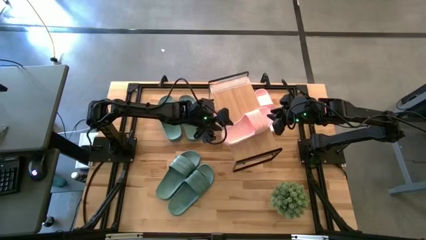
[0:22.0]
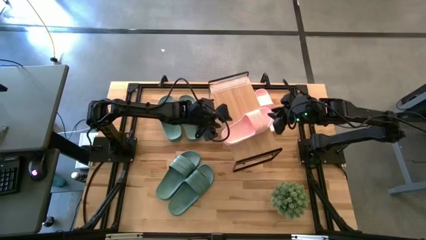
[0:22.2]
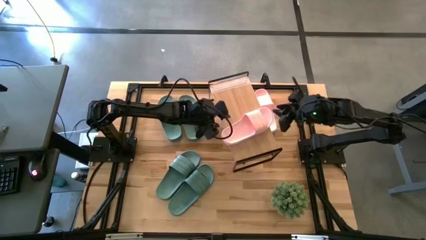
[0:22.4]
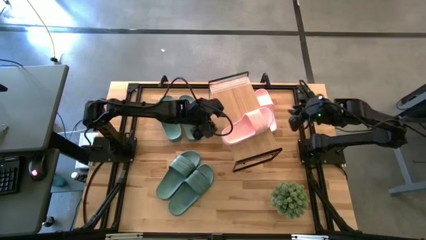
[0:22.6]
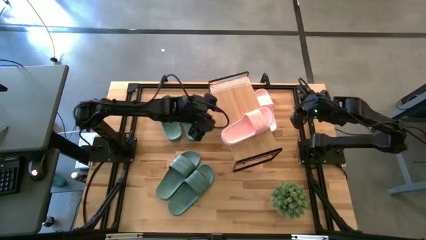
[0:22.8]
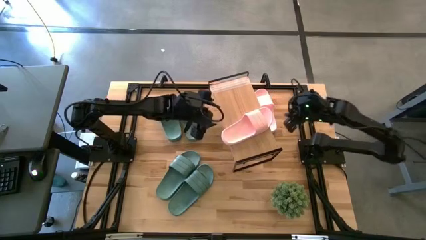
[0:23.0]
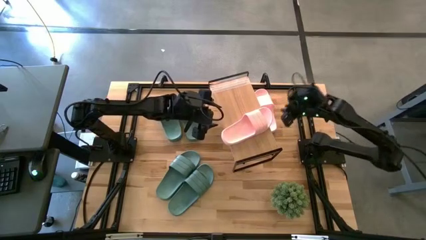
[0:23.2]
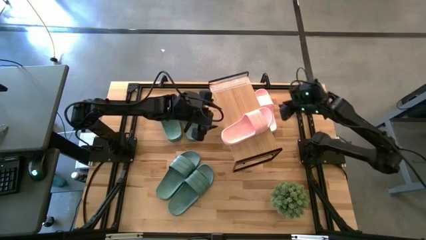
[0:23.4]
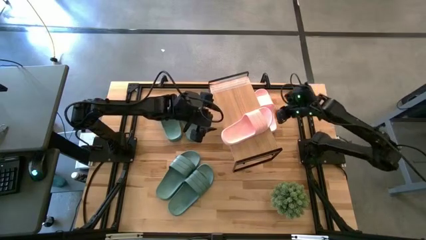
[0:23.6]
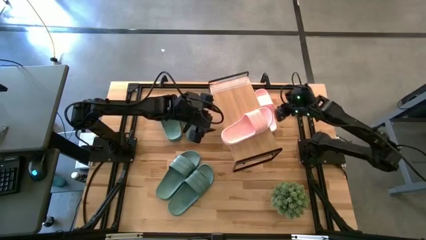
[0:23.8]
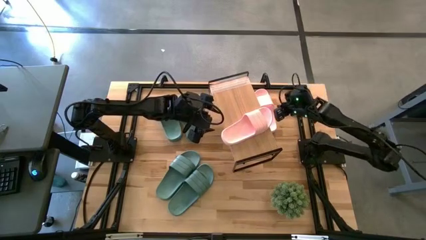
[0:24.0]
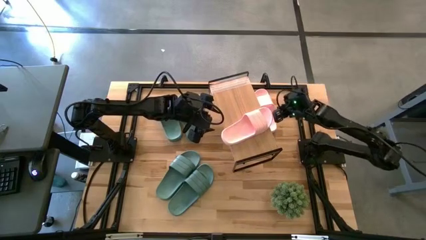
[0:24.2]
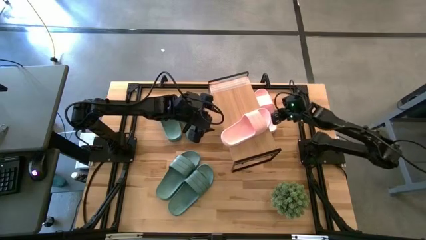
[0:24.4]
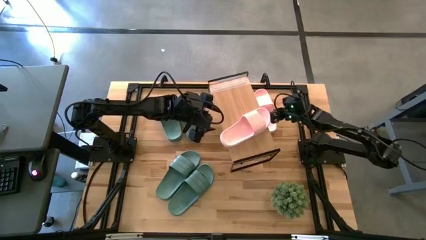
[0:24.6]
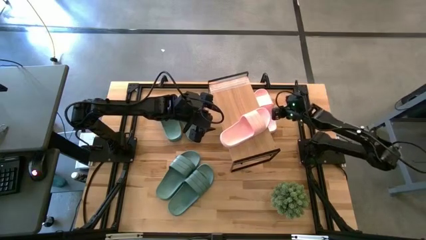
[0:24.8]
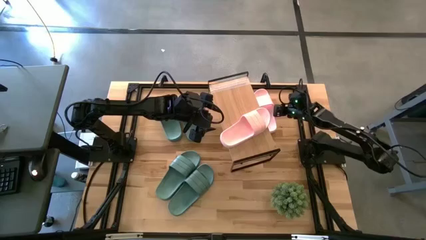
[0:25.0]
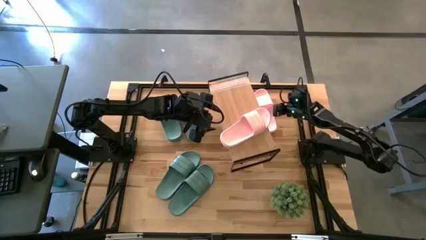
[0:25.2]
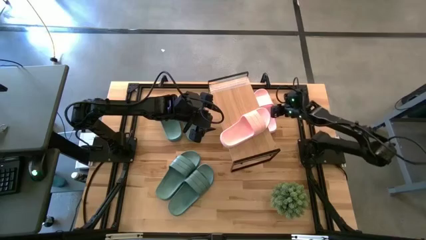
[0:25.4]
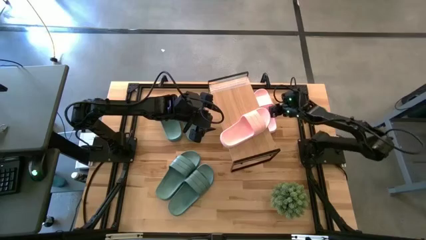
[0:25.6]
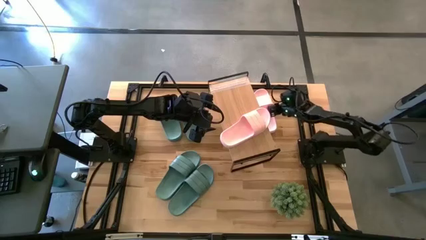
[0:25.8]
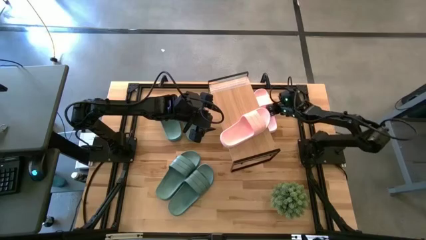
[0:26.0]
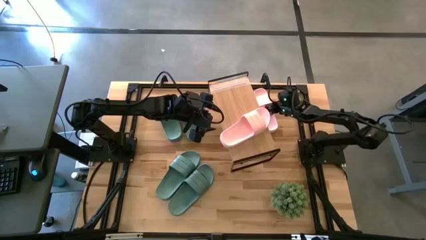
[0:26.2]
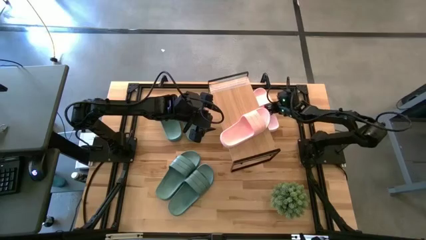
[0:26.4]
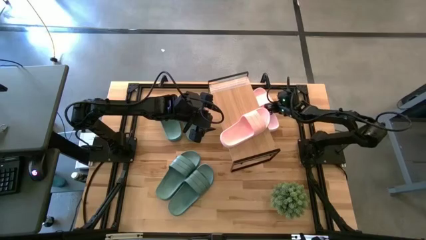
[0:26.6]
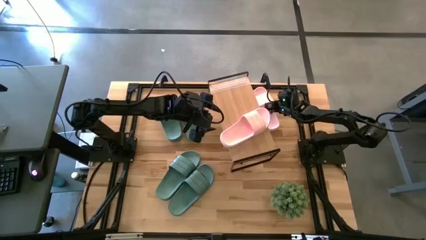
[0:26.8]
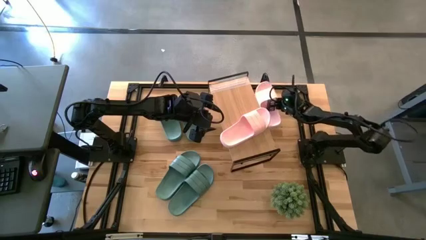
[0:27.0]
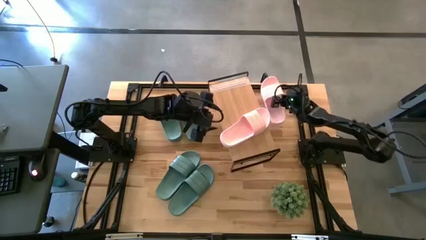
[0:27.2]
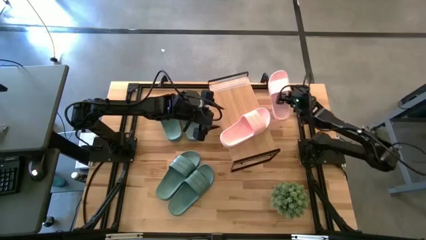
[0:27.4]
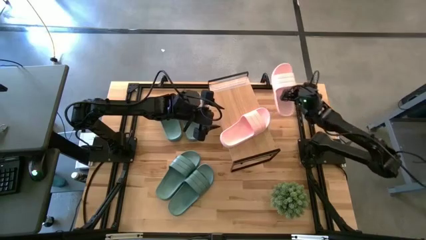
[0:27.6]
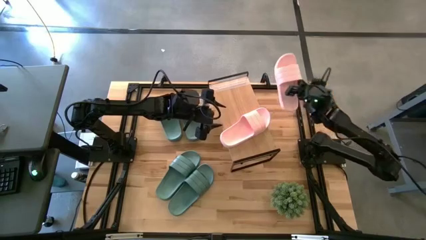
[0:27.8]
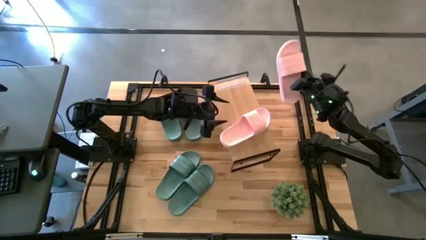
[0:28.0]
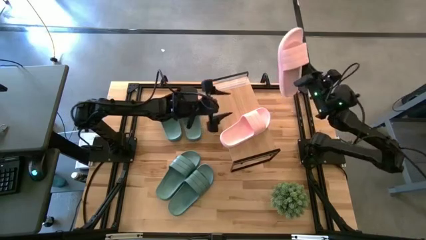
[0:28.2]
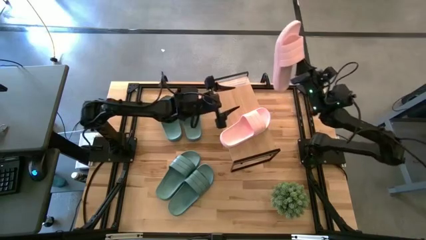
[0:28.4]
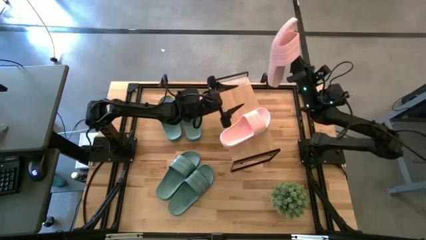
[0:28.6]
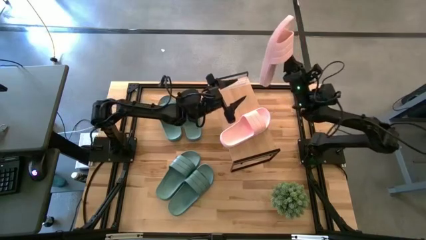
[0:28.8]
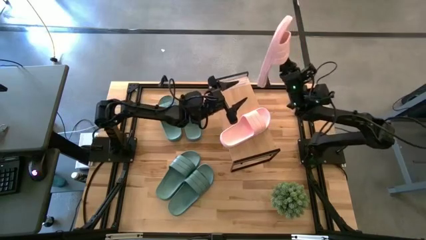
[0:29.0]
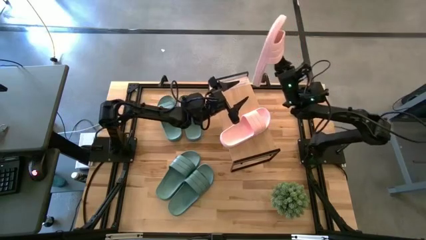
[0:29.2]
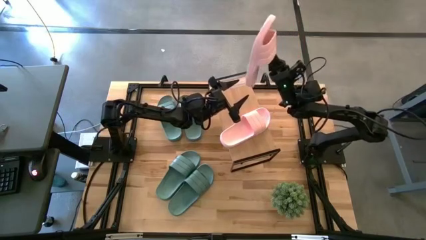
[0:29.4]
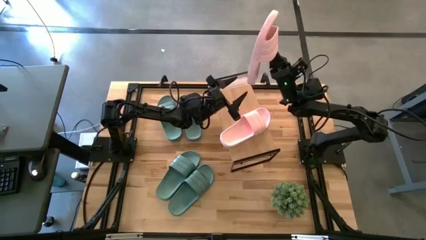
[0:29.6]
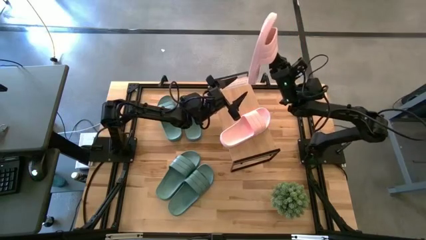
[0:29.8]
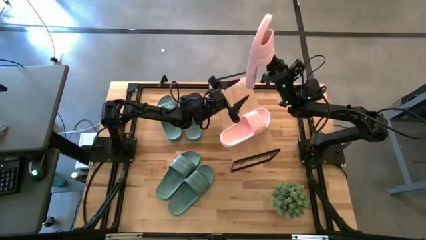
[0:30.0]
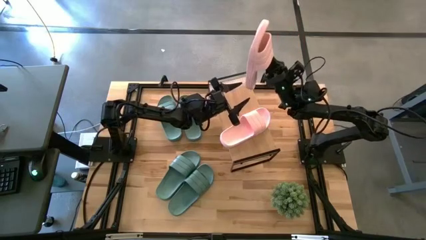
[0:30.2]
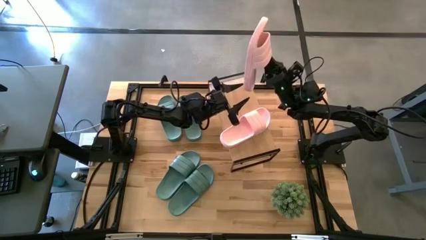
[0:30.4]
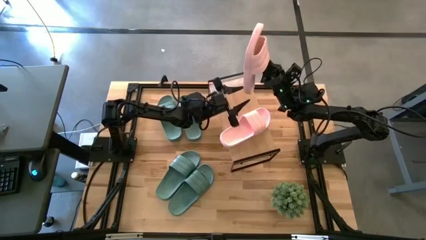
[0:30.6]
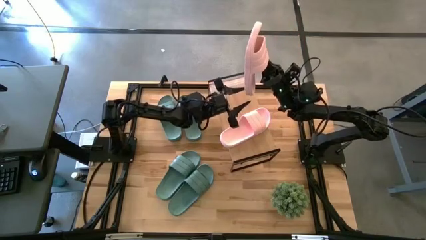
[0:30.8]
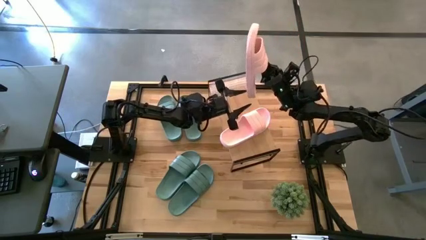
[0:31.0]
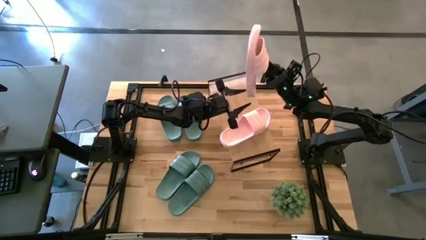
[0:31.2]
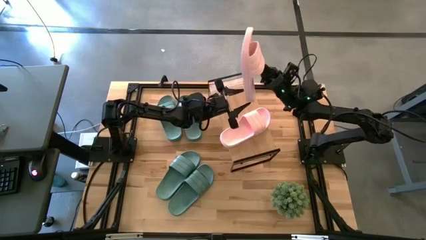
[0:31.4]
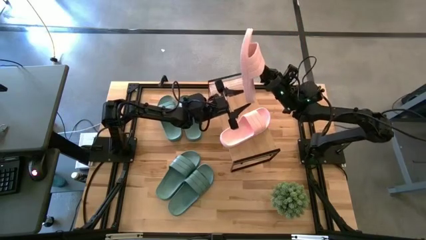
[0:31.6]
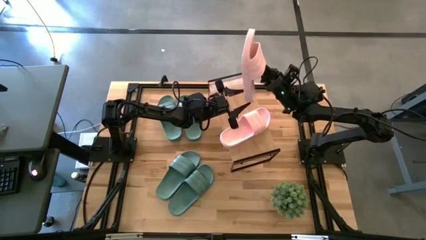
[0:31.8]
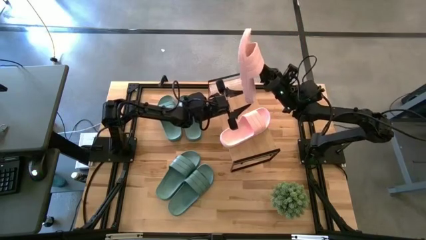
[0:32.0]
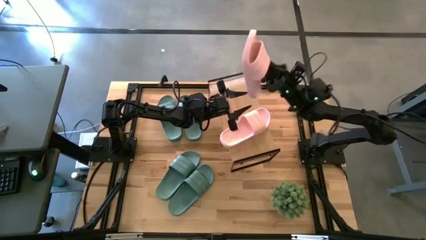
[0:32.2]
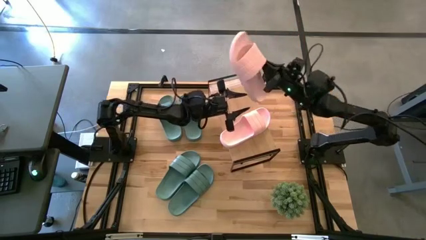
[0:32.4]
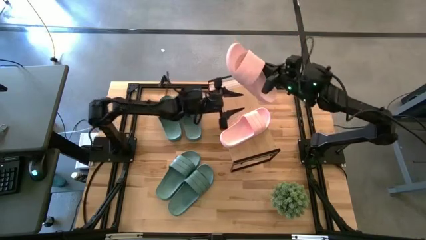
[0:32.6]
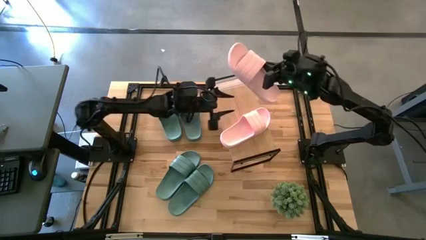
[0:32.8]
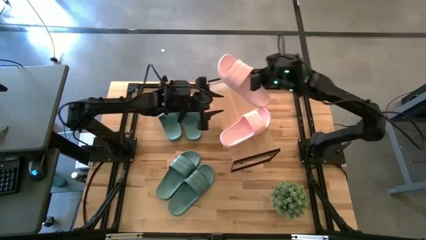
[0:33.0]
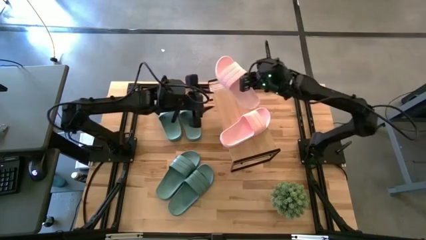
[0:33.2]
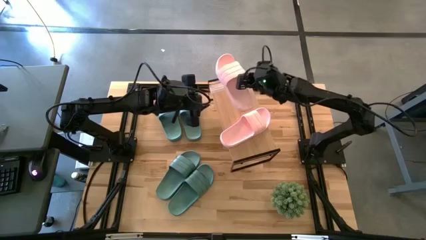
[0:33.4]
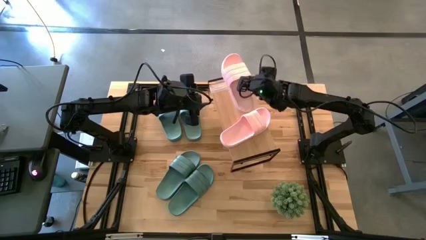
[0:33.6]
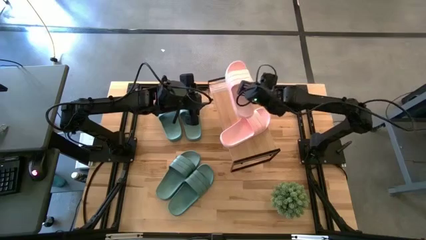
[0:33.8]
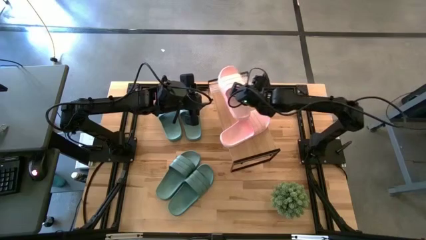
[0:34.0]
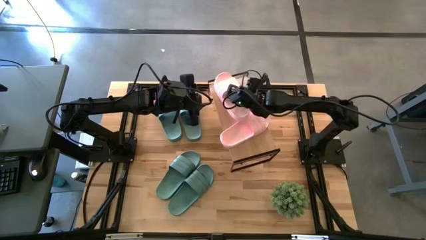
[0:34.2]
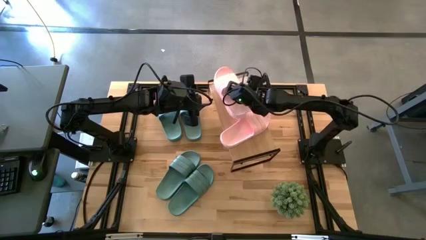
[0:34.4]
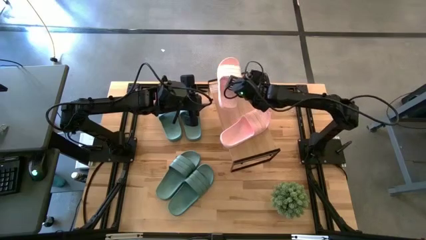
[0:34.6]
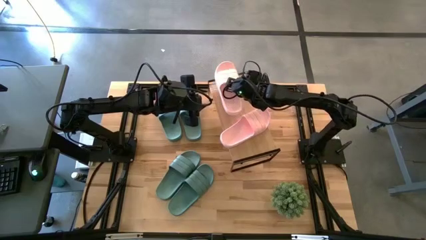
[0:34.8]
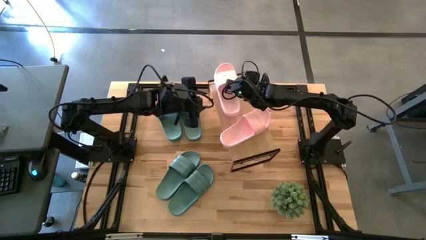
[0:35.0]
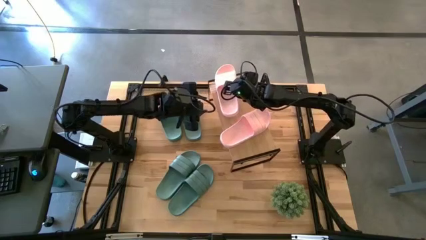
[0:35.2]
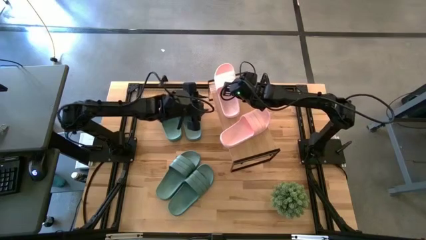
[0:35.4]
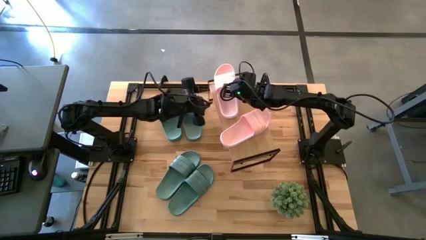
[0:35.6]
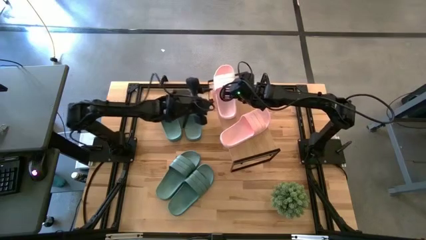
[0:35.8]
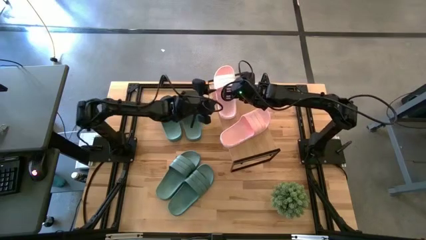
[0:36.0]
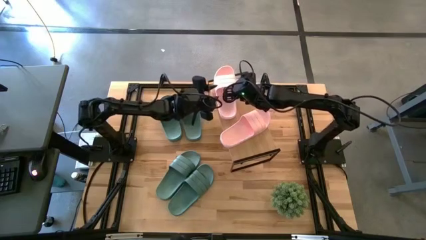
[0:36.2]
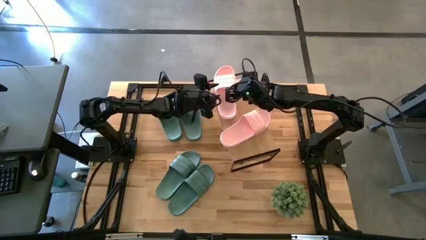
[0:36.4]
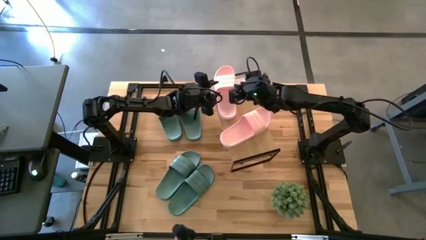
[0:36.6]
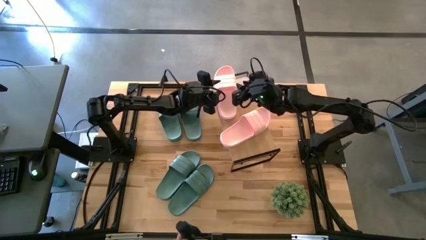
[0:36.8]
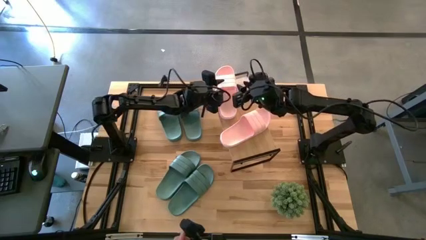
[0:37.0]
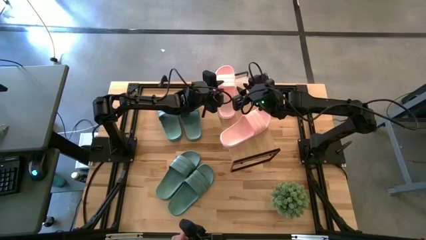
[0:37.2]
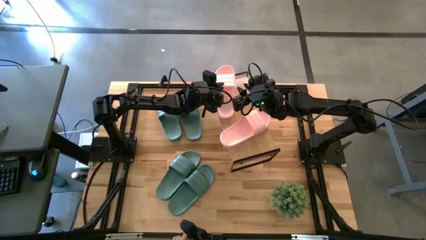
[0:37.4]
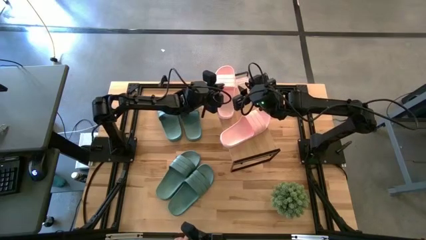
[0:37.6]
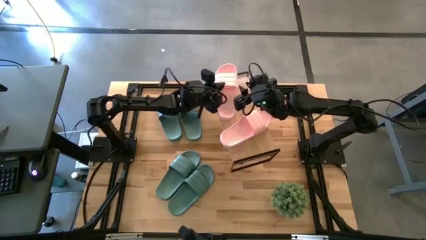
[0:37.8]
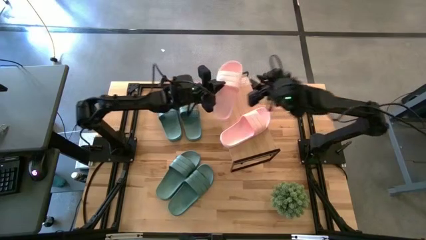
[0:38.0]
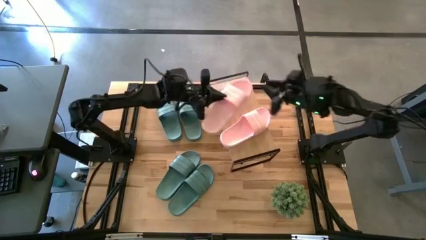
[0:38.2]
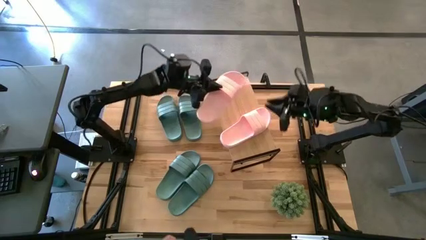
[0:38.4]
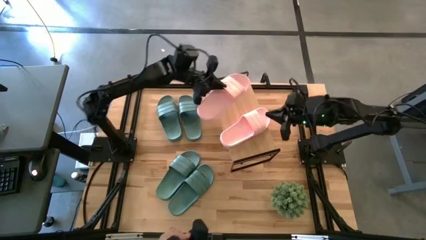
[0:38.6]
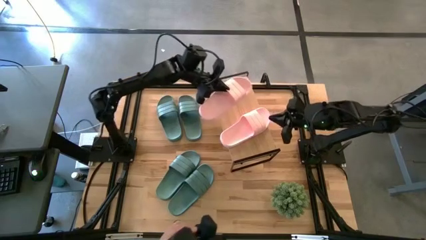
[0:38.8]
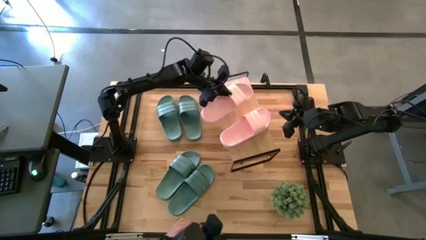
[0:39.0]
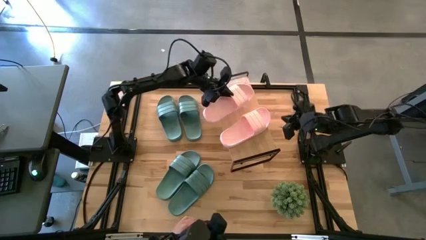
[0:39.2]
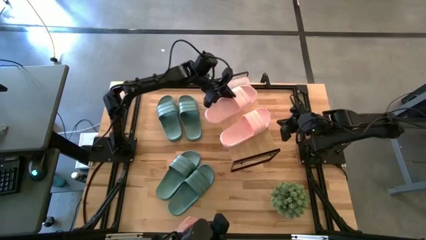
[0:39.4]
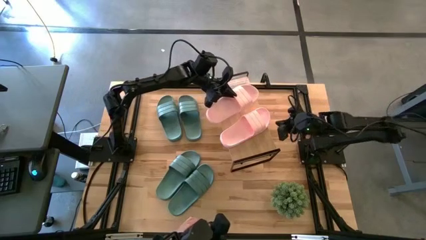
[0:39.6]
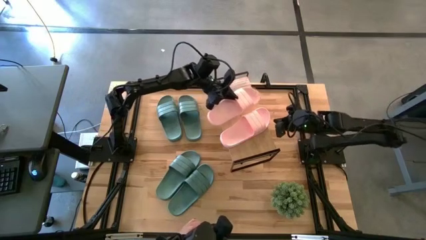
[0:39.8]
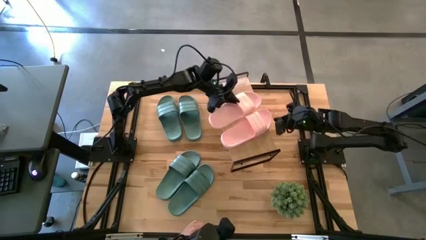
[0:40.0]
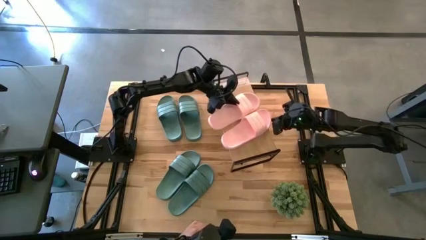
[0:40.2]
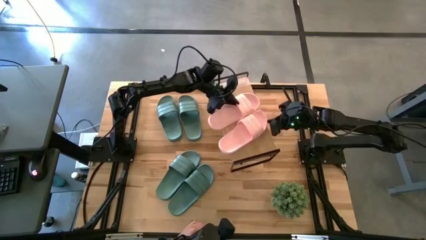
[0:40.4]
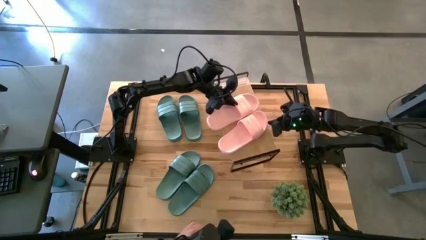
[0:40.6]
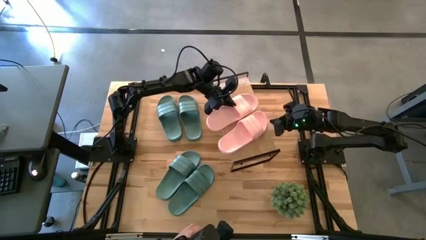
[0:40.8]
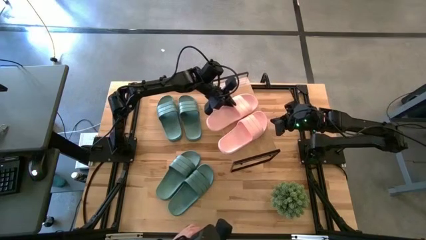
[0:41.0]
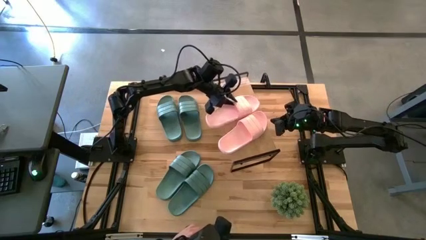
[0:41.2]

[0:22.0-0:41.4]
Task: Pick and place slides into the shelf
Put the pink slide on the shelf
